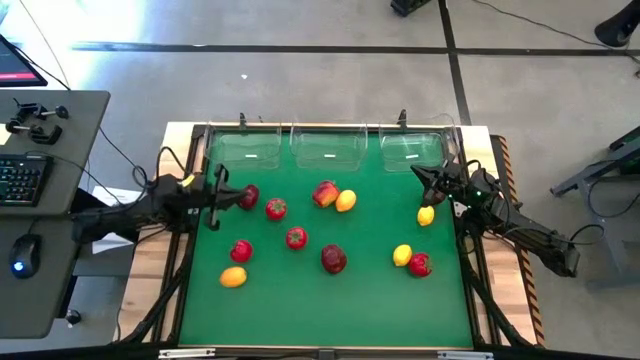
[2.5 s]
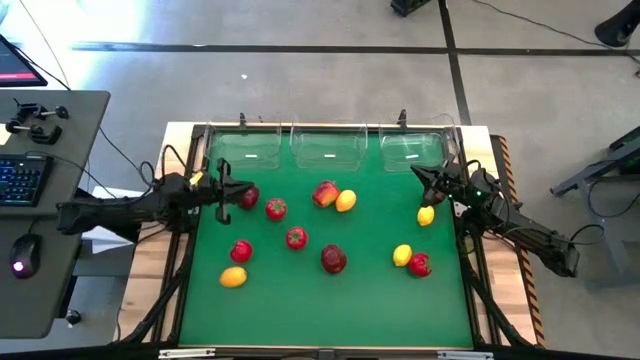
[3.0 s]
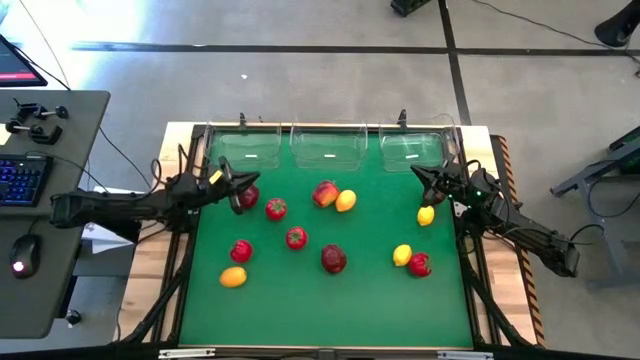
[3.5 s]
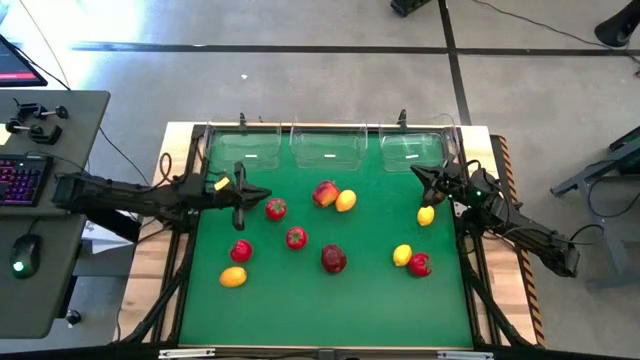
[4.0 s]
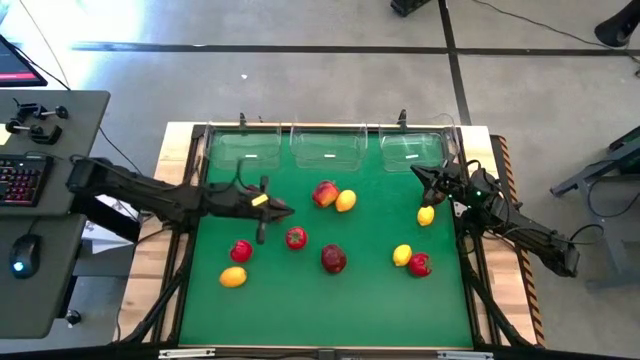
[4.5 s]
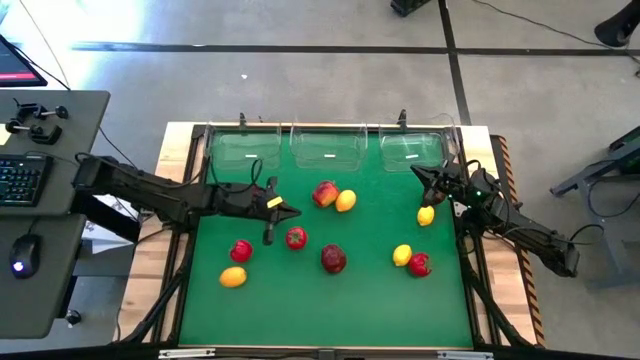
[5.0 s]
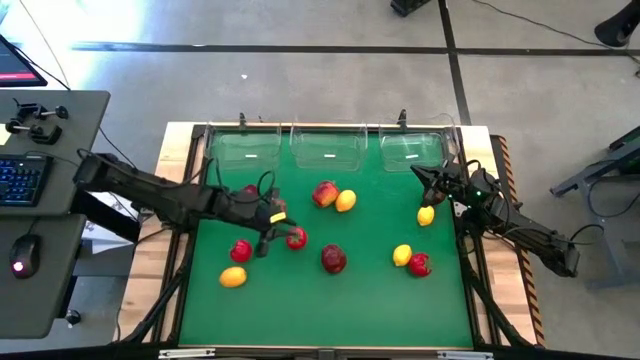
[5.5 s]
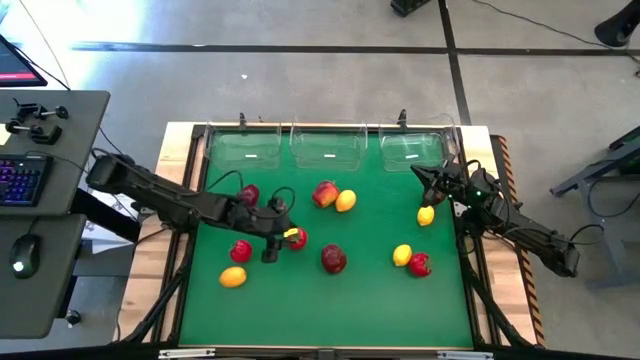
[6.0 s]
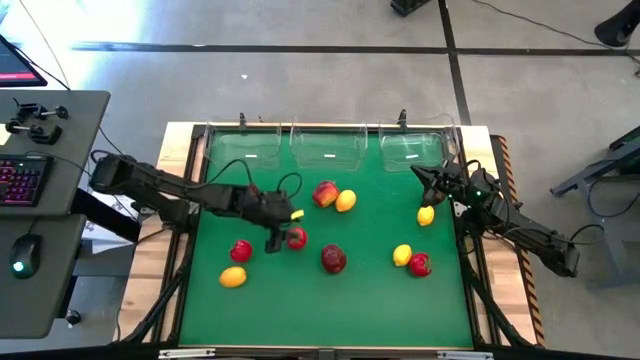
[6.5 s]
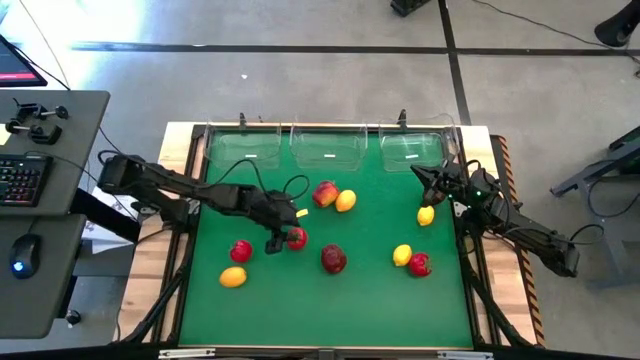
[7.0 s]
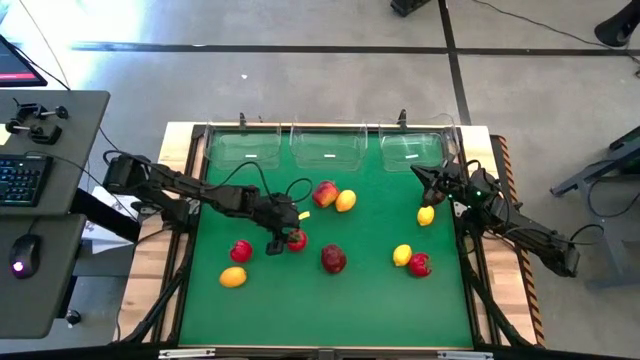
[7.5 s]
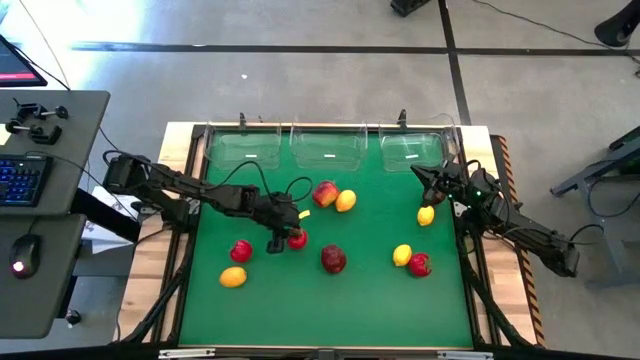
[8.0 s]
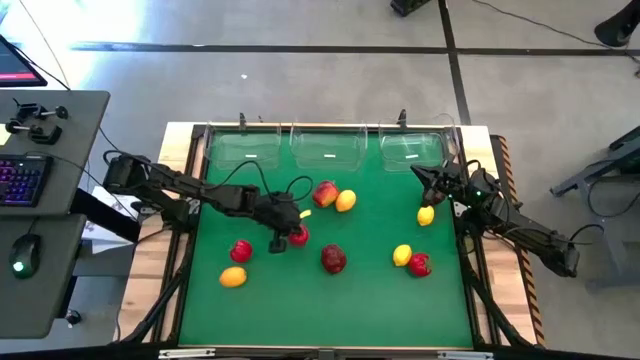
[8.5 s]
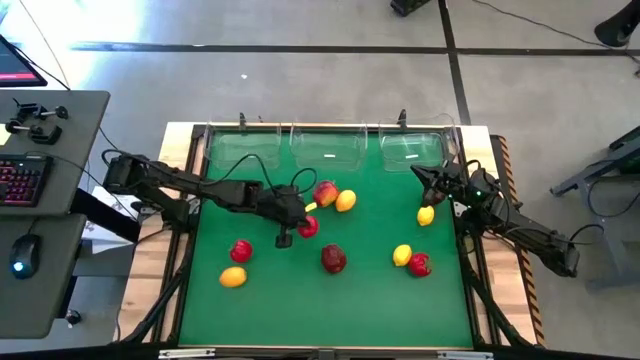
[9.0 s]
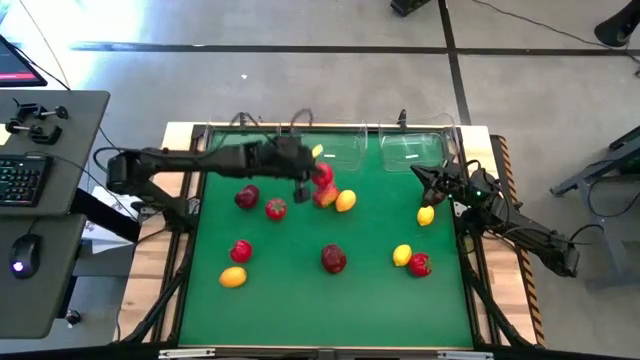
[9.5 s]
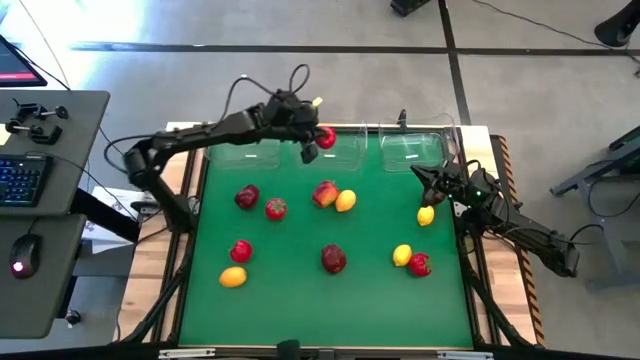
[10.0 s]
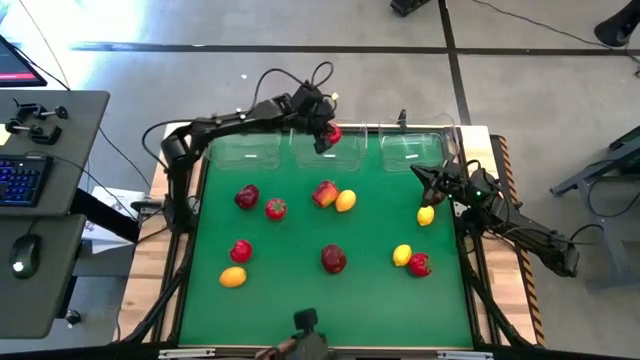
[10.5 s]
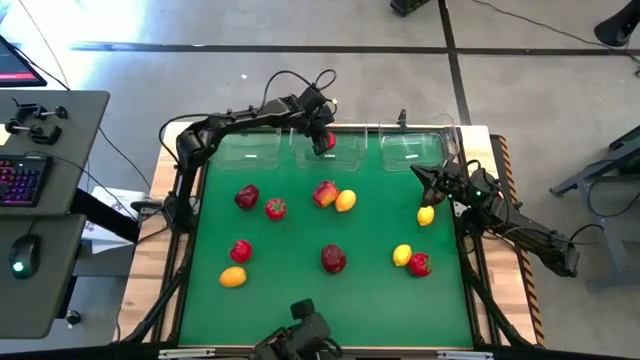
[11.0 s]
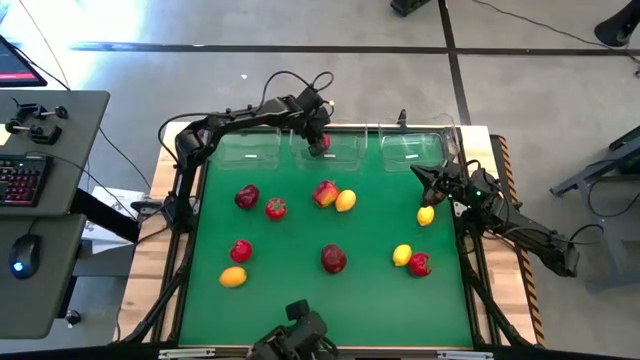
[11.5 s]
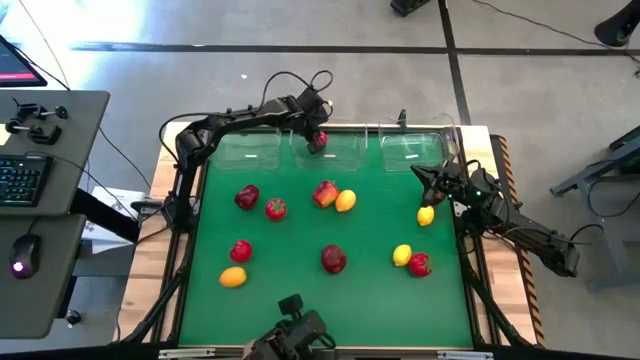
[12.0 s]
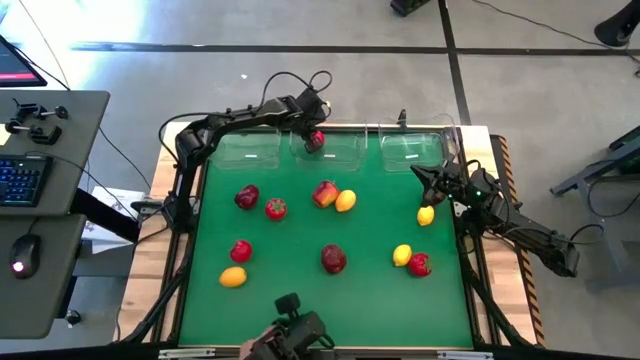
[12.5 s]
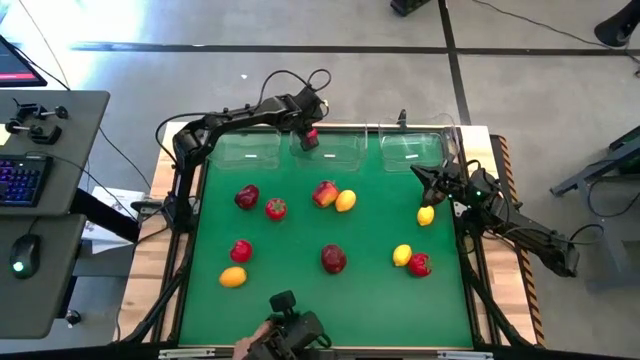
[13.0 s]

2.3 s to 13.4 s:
Task: Sort produce into baskets
Put the red tomato into the middle transparent bin

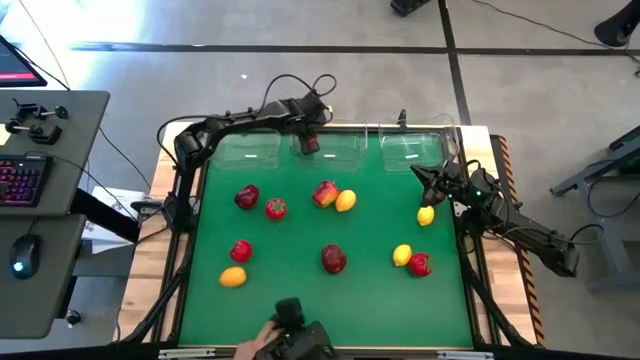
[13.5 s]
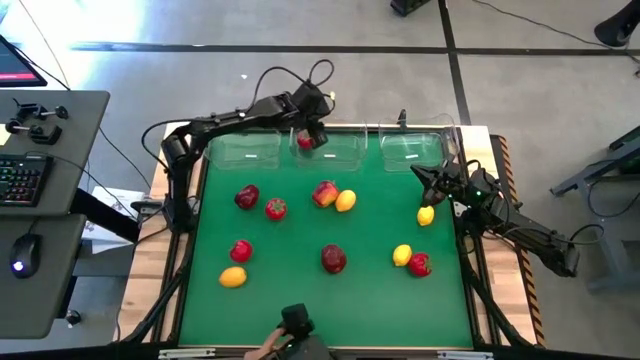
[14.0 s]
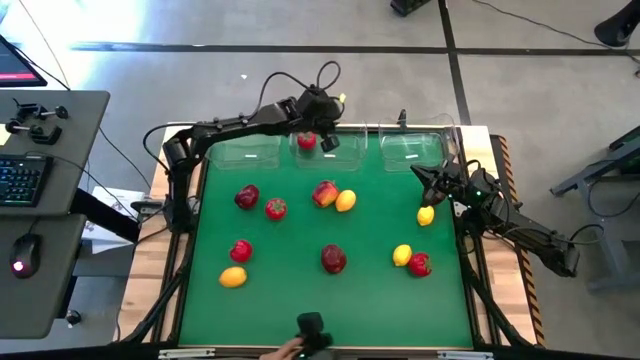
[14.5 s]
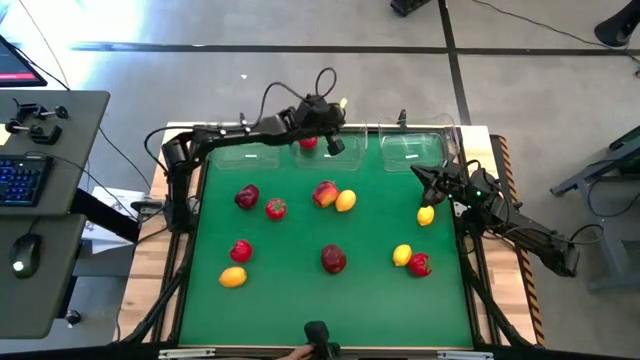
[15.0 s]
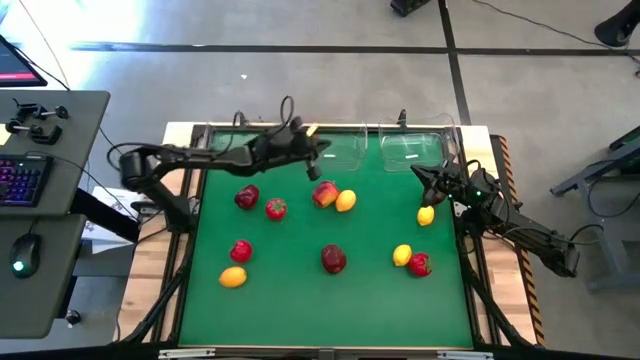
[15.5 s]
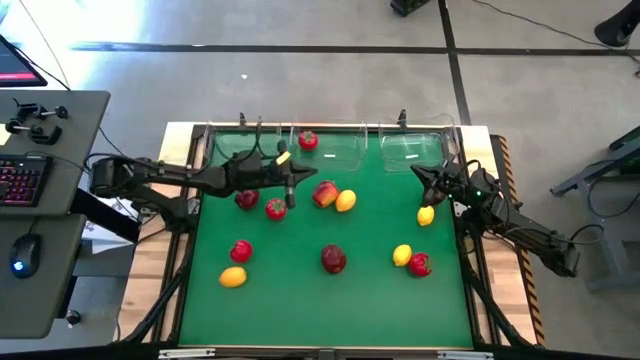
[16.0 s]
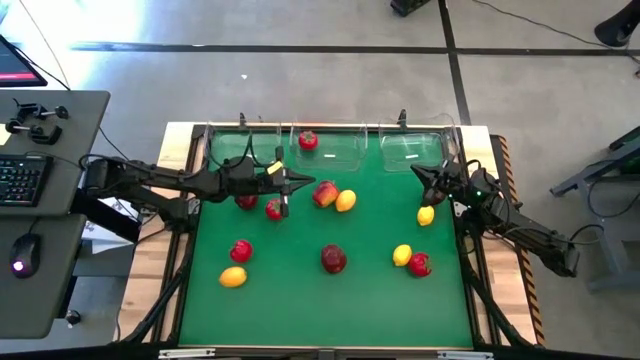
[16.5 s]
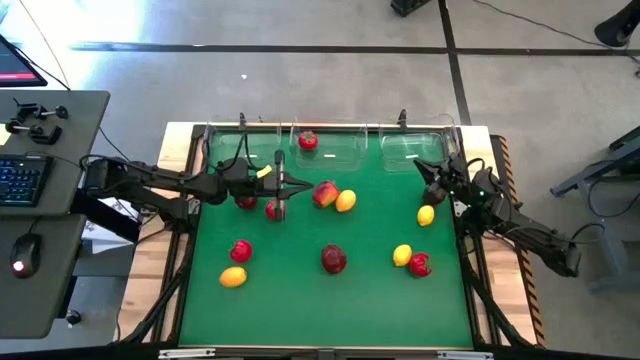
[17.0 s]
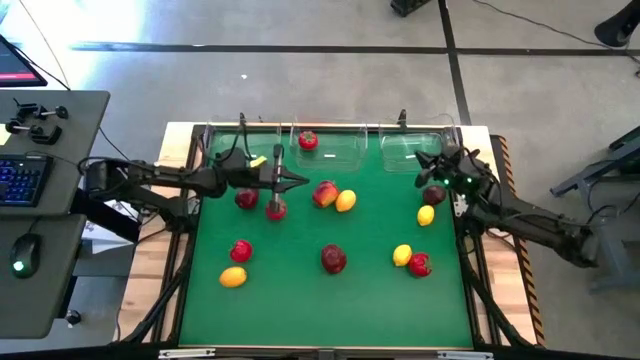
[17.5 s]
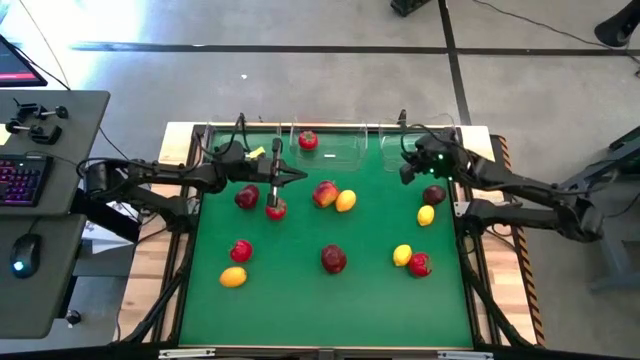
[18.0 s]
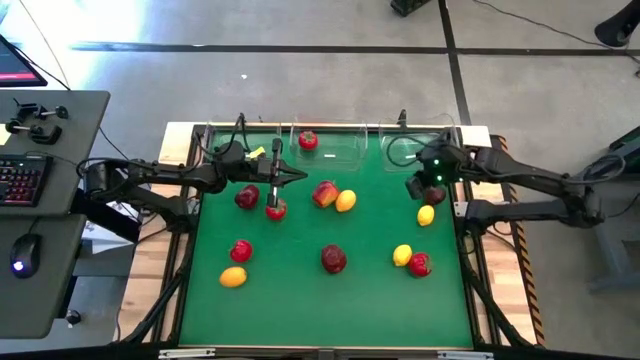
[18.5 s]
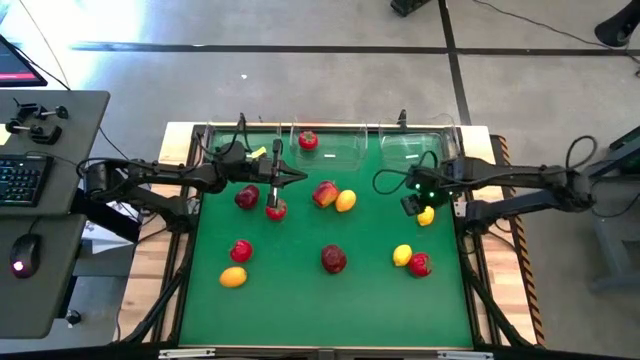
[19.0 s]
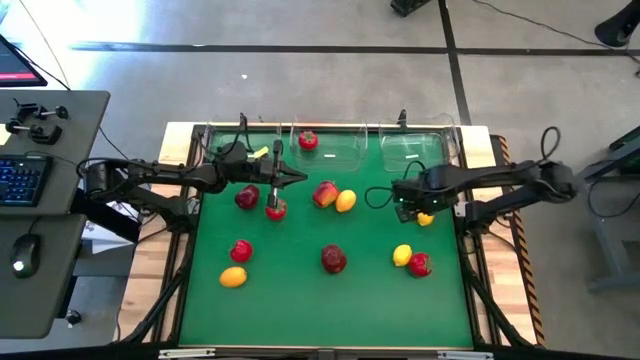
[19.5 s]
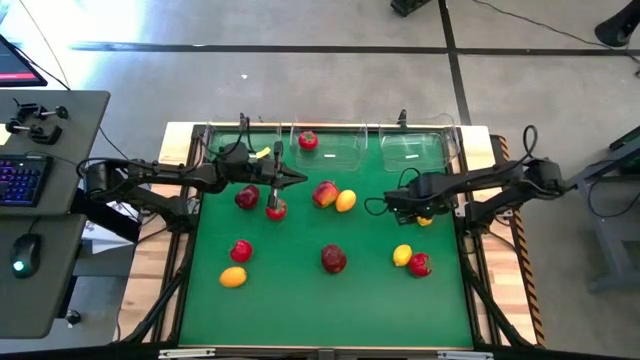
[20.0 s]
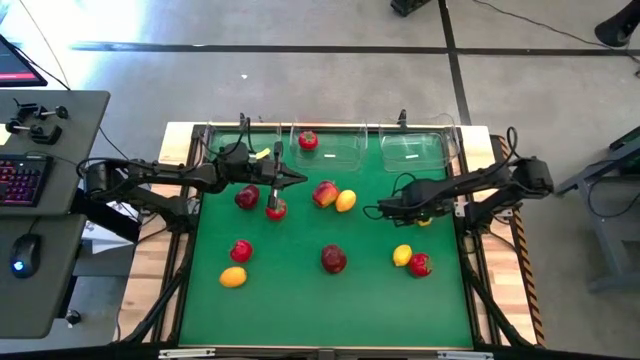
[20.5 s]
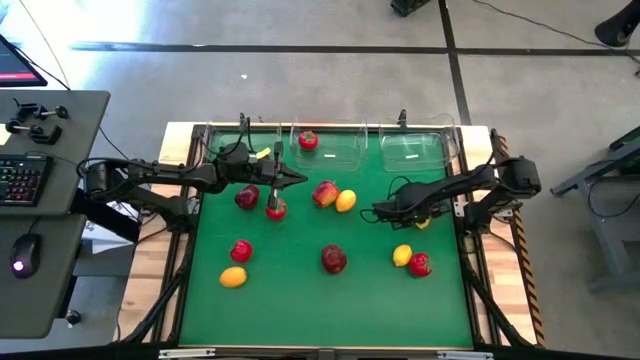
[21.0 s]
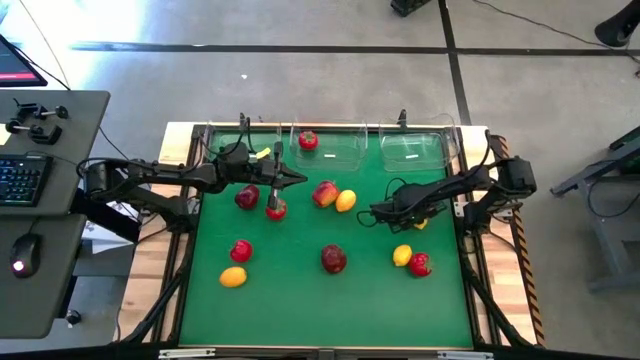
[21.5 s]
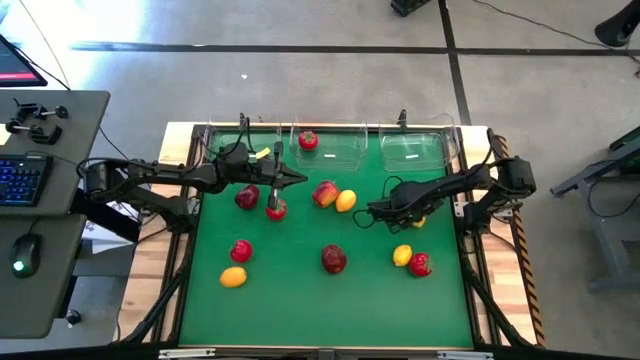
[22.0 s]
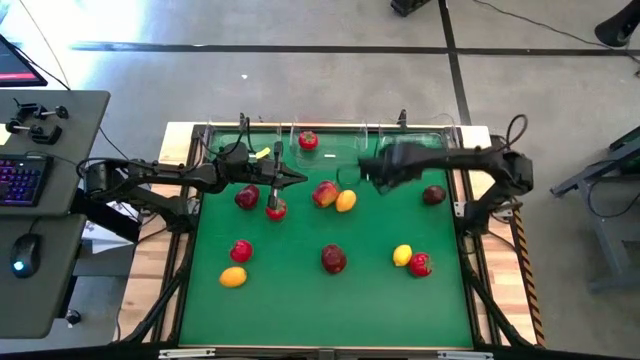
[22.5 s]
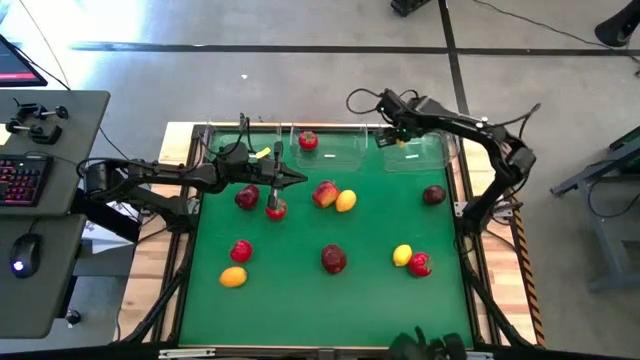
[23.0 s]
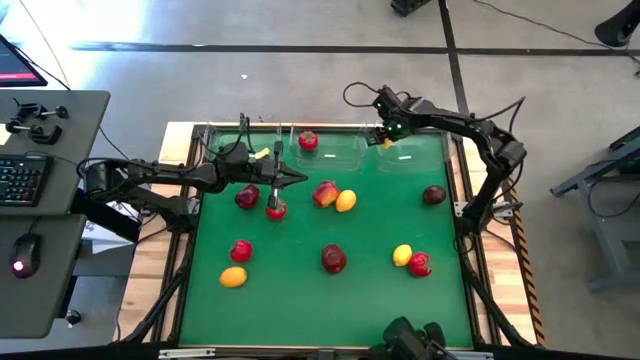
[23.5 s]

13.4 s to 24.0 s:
Put the lemon into the right transparent bin
